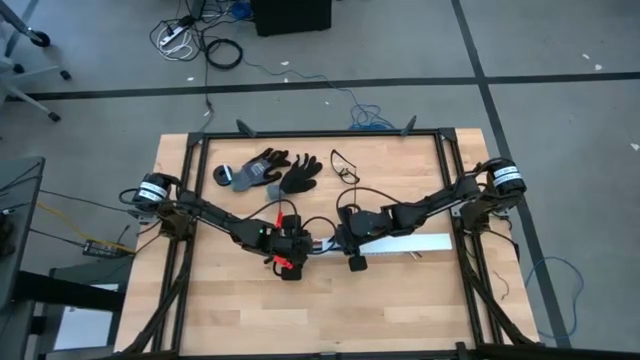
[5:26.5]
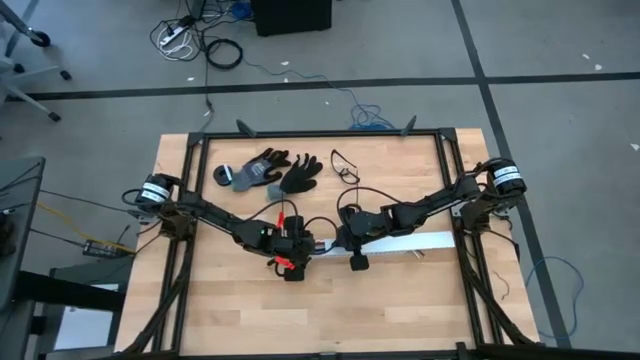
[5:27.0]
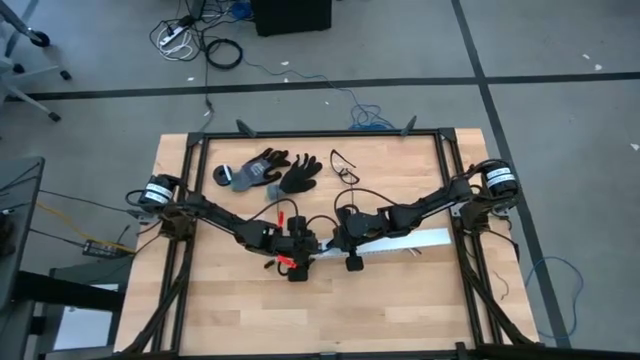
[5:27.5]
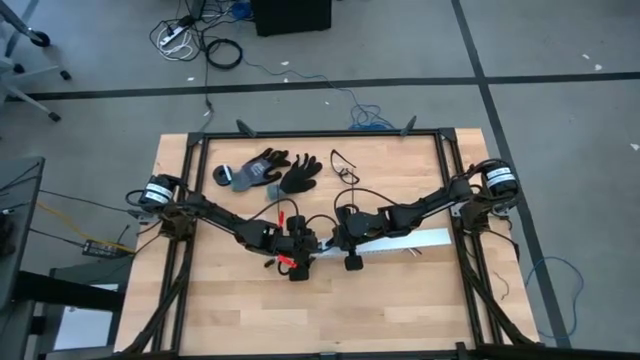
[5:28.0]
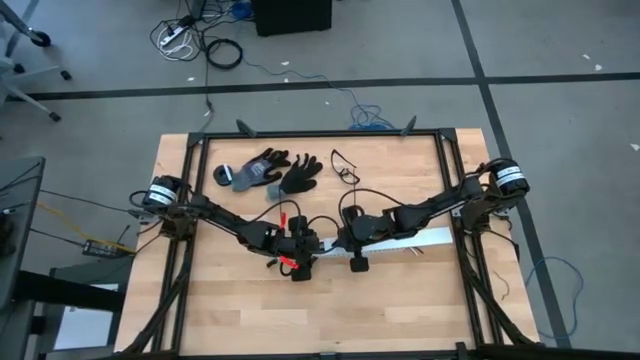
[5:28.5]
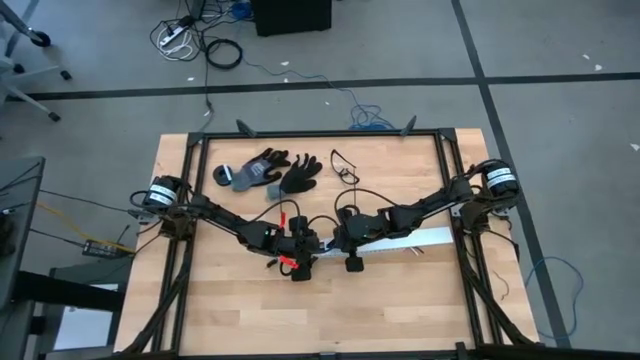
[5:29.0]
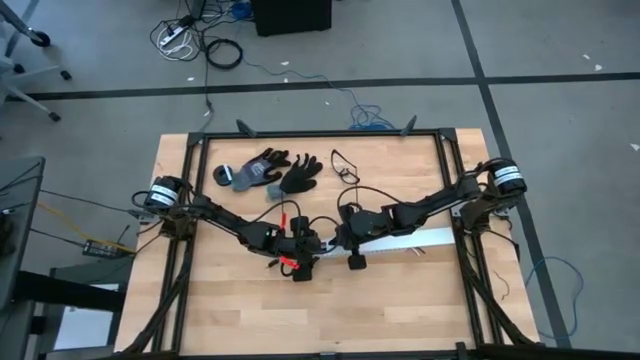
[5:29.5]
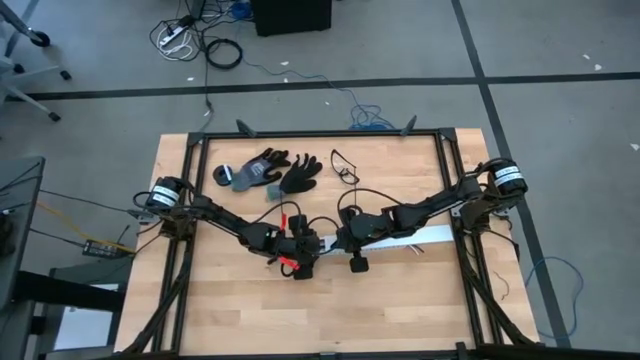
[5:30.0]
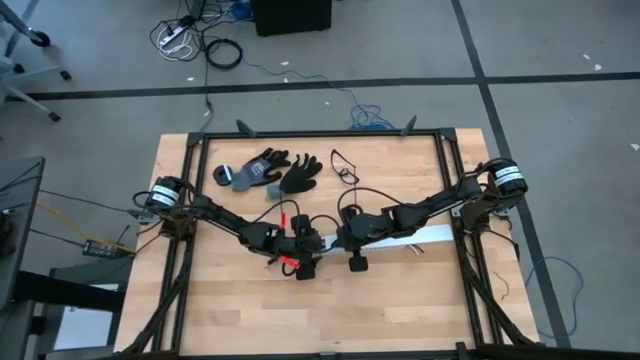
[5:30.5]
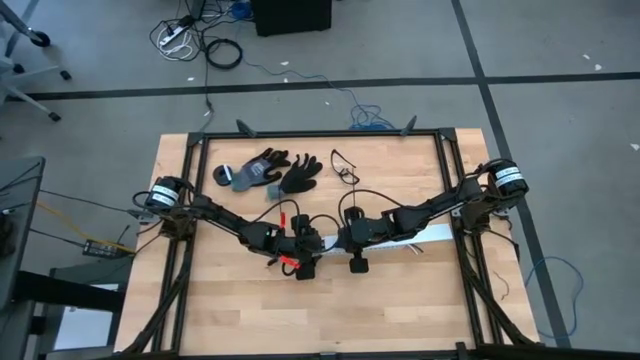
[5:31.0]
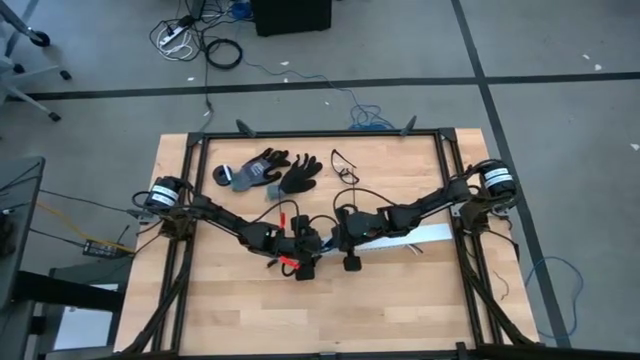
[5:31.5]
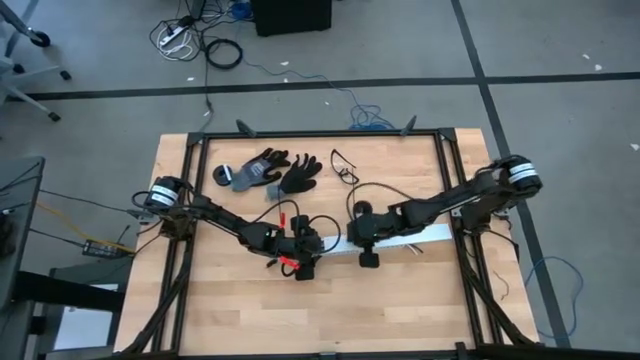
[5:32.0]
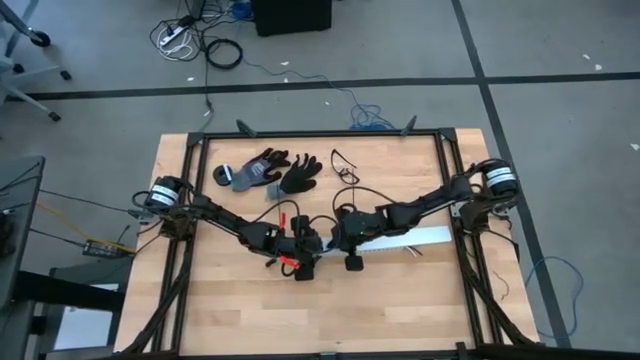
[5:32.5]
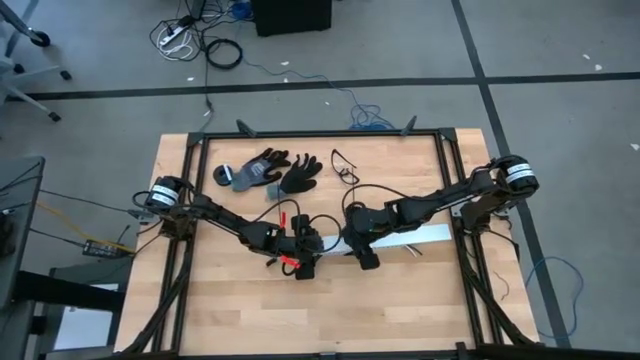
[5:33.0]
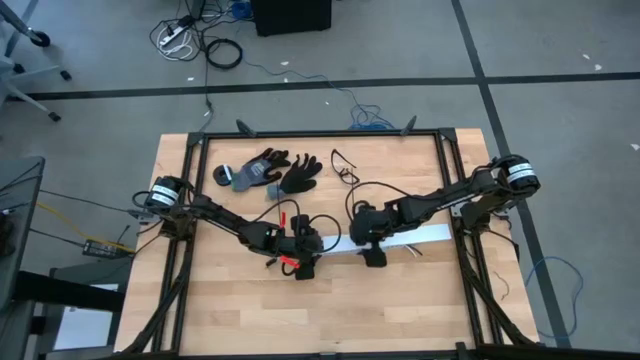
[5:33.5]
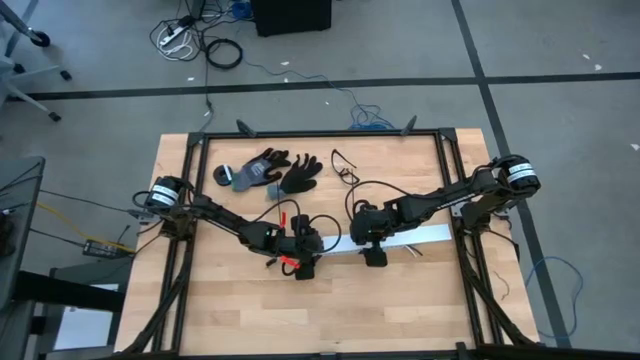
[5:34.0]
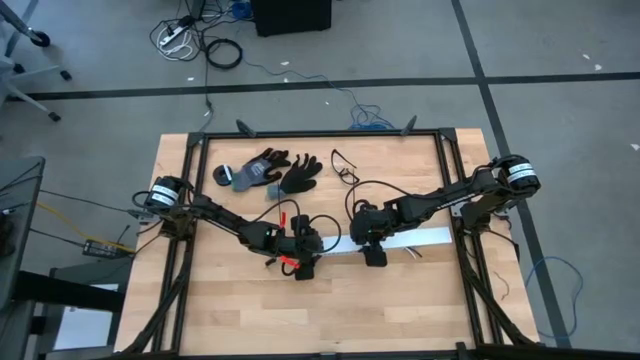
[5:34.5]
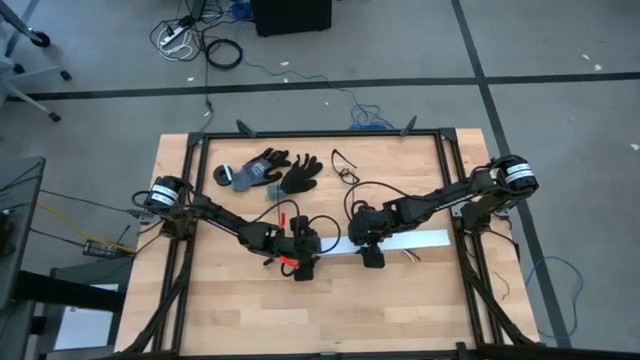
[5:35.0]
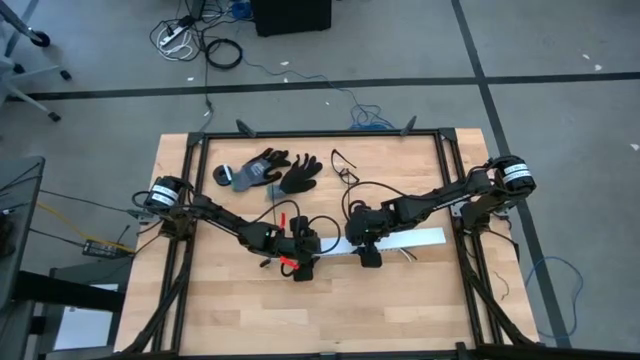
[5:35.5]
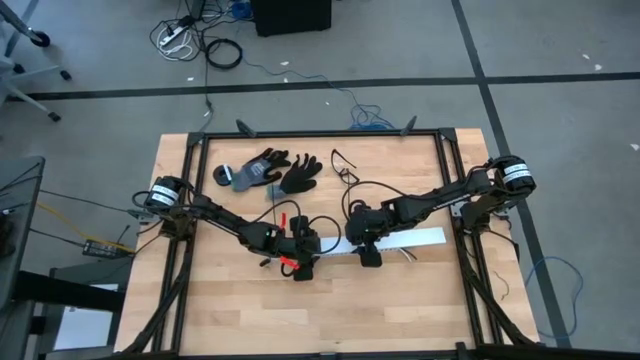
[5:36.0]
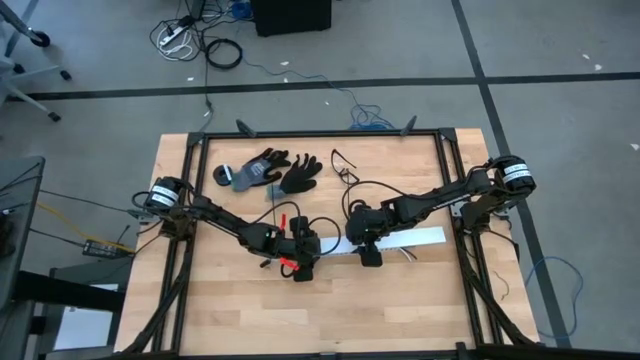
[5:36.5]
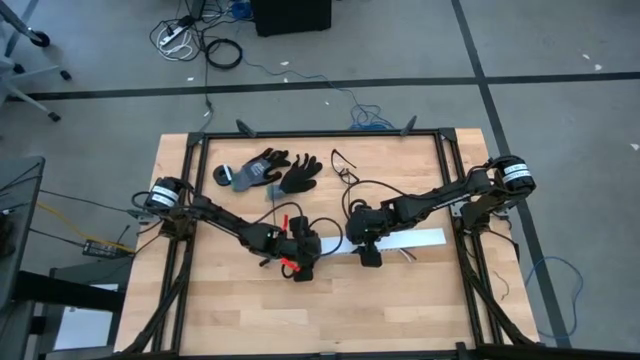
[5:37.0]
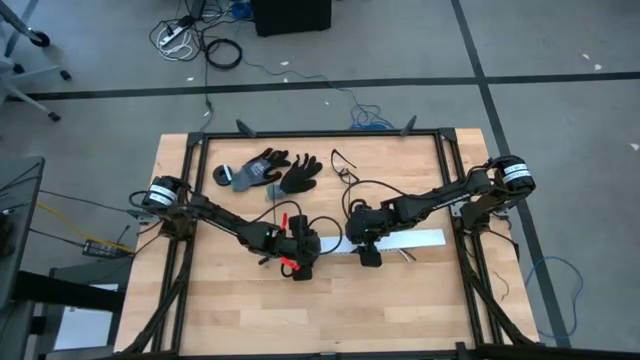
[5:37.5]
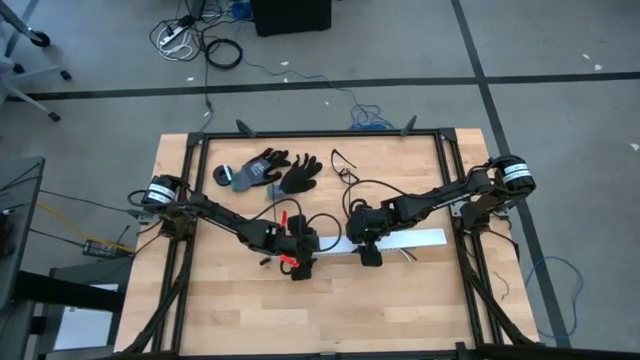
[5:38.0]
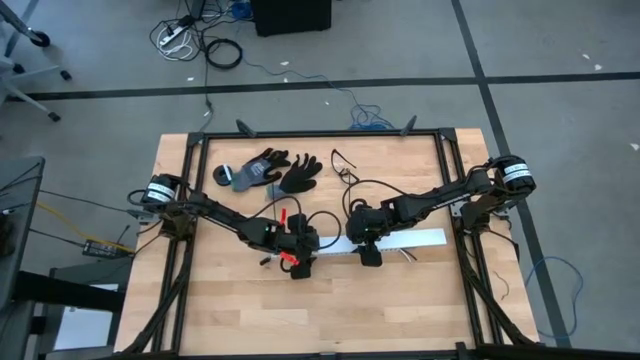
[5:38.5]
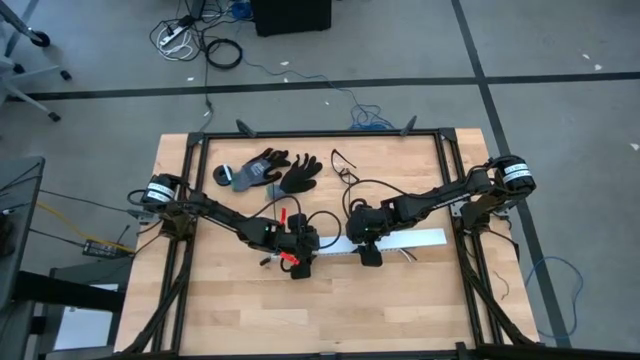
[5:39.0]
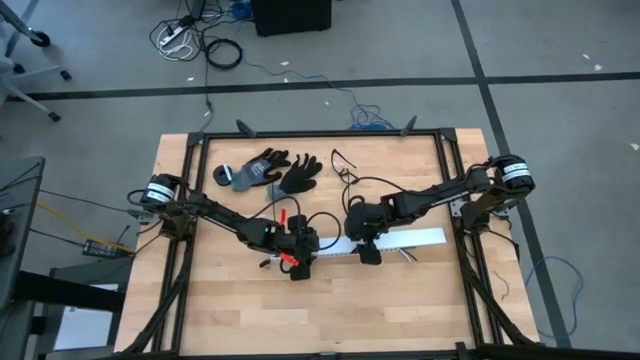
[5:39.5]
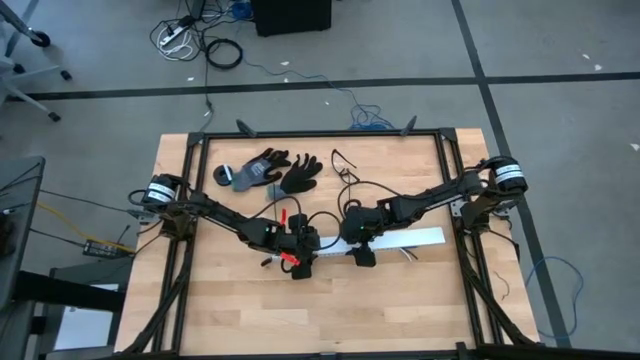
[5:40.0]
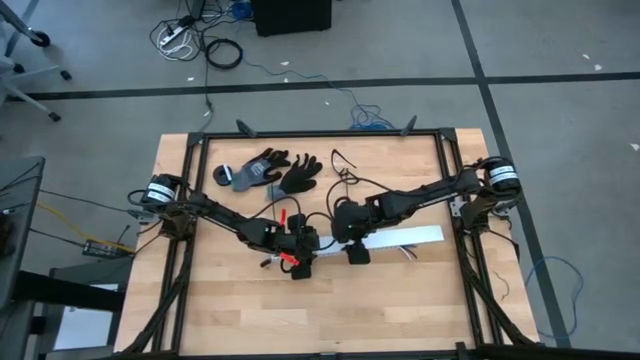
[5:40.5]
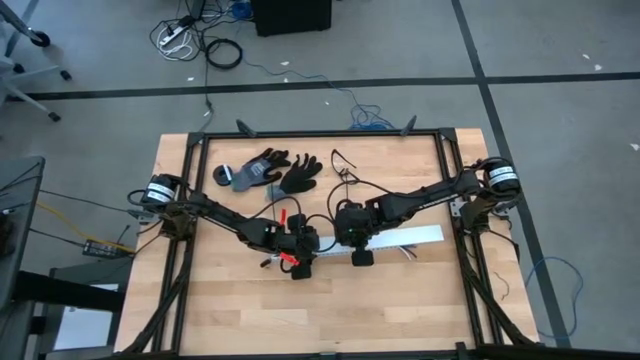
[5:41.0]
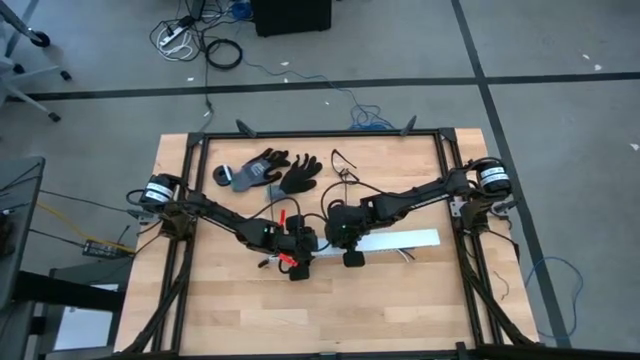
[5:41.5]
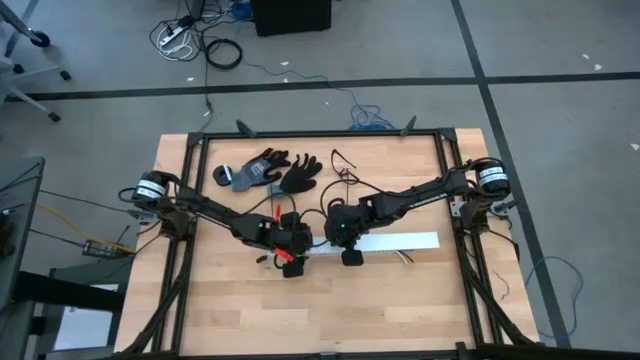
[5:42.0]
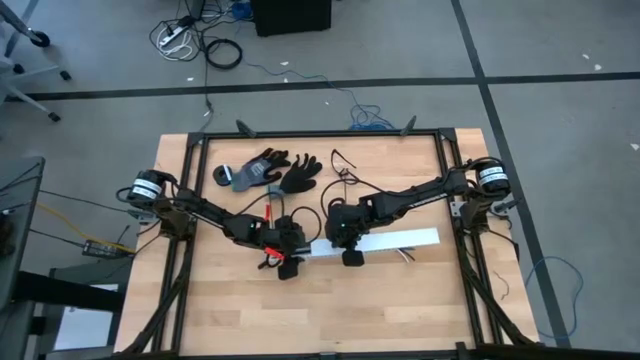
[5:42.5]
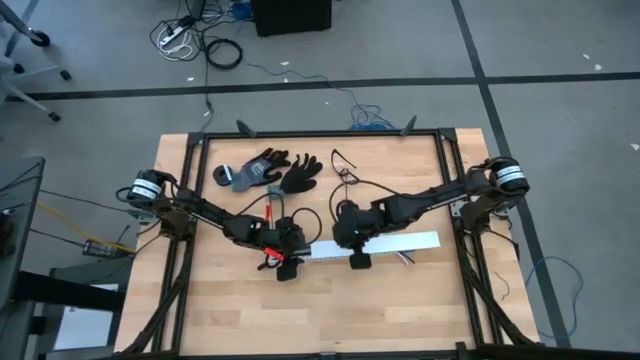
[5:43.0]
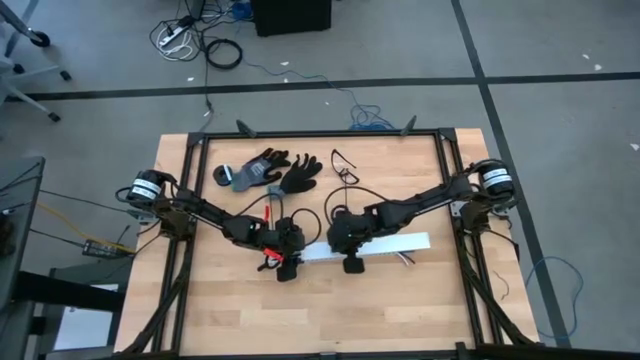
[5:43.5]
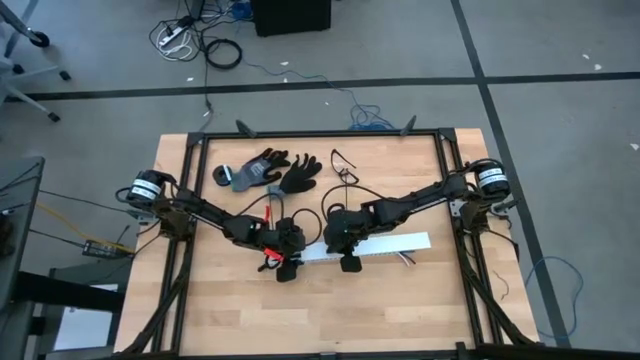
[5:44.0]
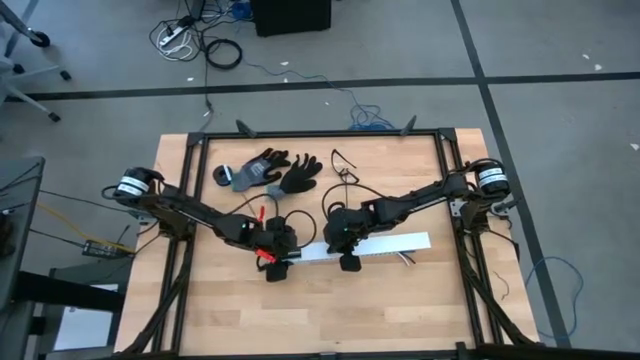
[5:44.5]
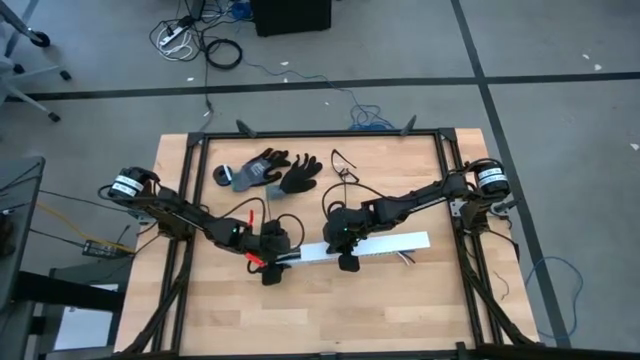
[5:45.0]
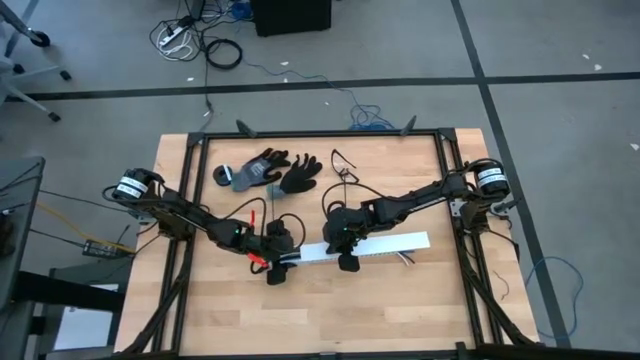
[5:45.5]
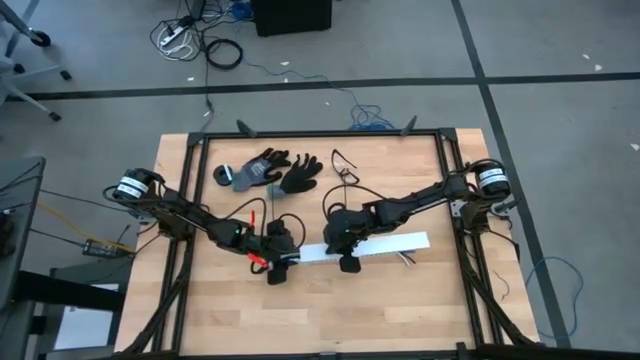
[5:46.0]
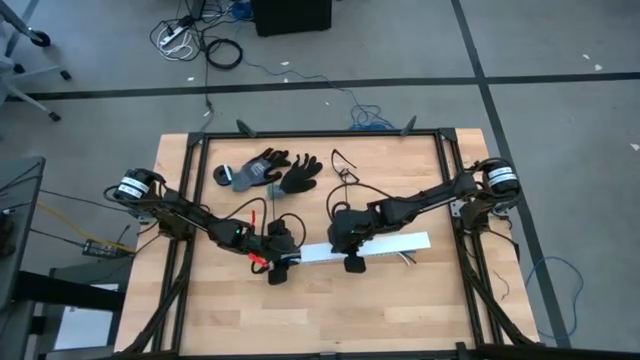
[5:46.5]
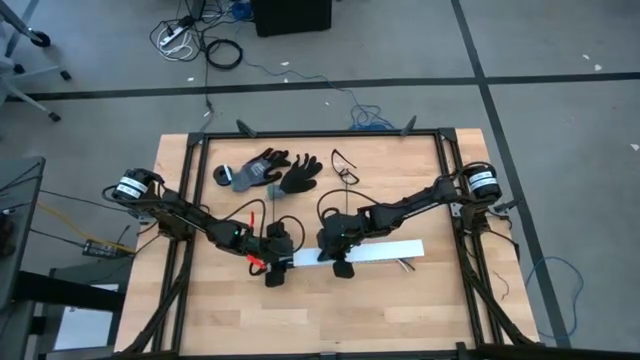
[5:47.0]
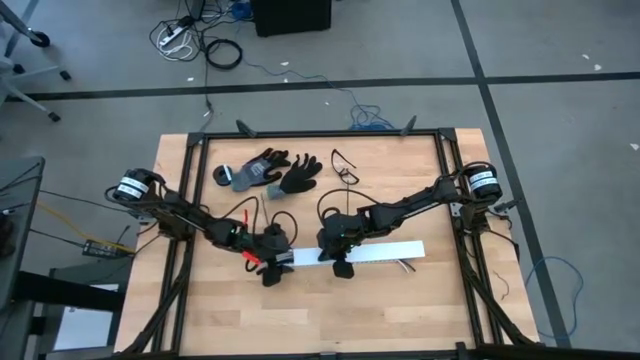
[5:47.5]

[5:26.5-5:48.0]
Task: Ziptie cables
Close the white cable duct
